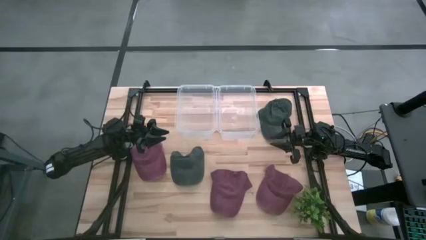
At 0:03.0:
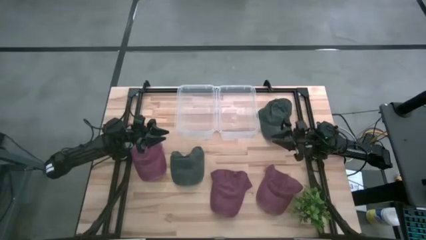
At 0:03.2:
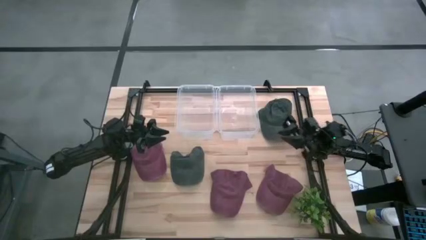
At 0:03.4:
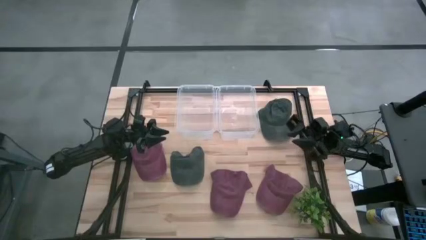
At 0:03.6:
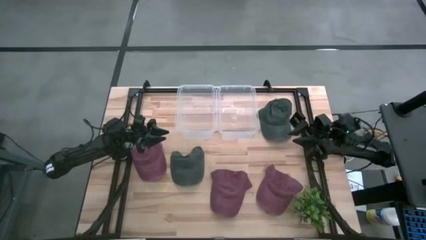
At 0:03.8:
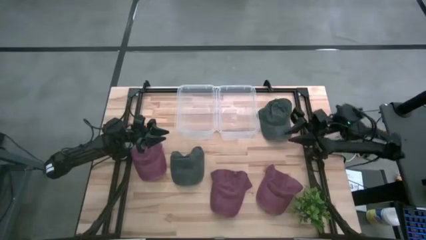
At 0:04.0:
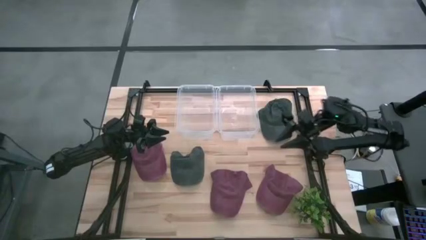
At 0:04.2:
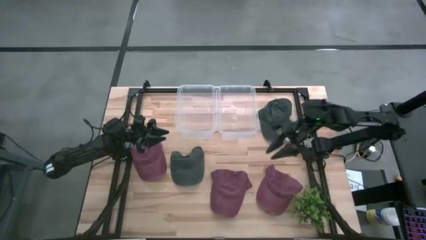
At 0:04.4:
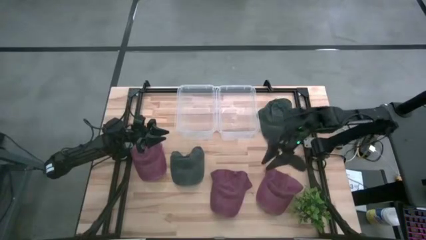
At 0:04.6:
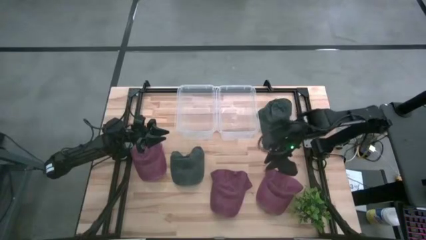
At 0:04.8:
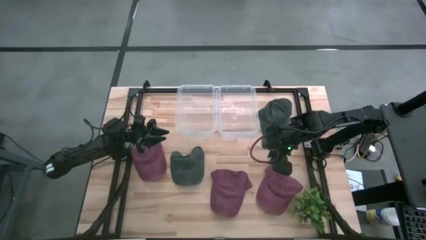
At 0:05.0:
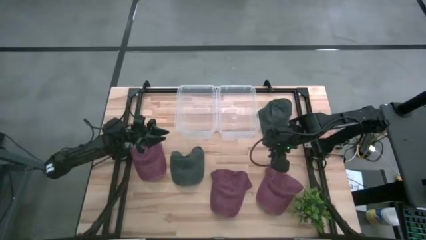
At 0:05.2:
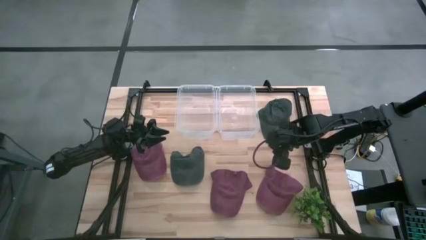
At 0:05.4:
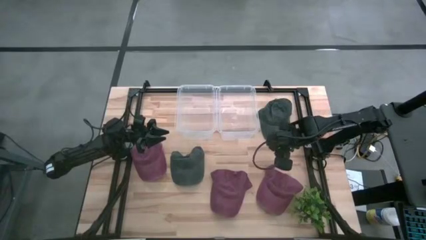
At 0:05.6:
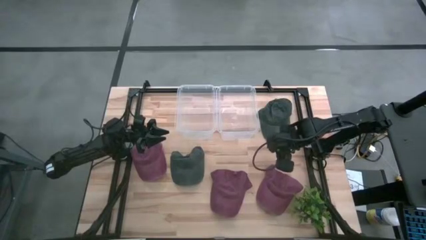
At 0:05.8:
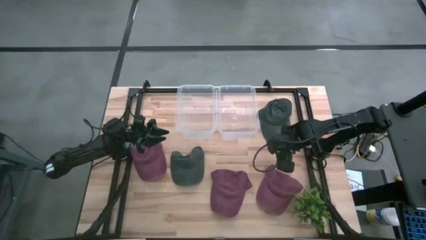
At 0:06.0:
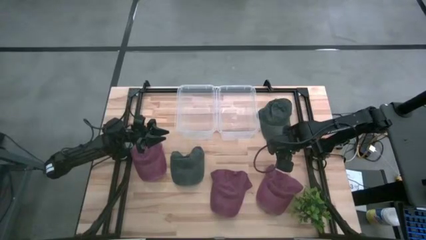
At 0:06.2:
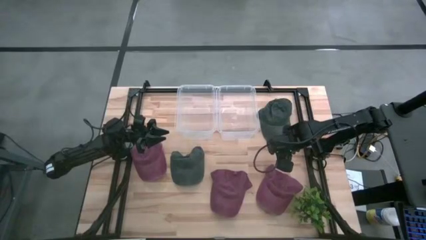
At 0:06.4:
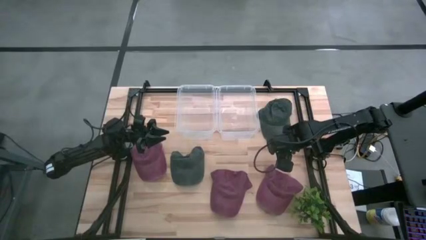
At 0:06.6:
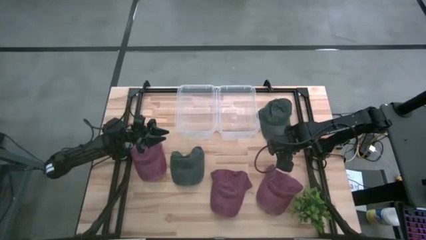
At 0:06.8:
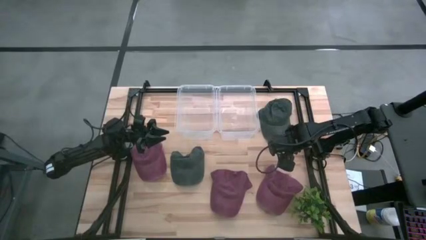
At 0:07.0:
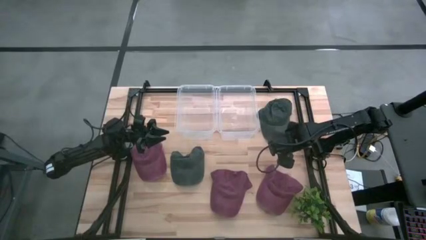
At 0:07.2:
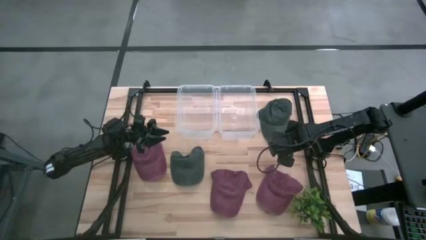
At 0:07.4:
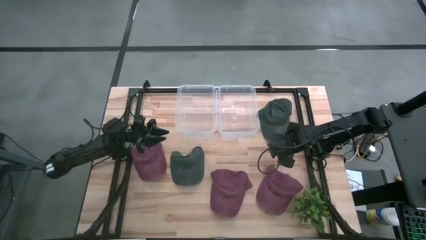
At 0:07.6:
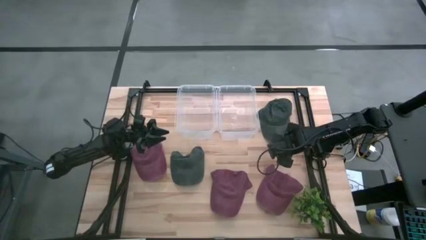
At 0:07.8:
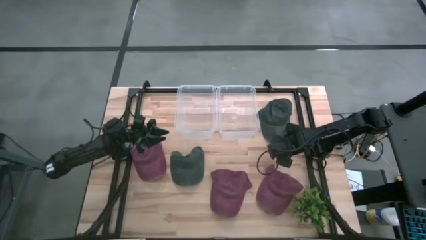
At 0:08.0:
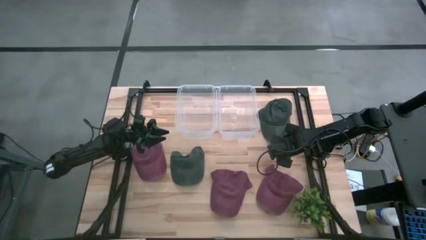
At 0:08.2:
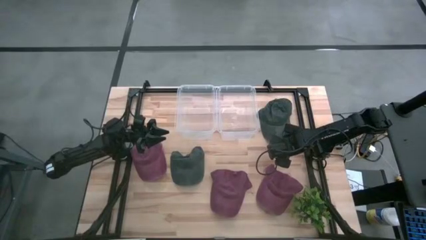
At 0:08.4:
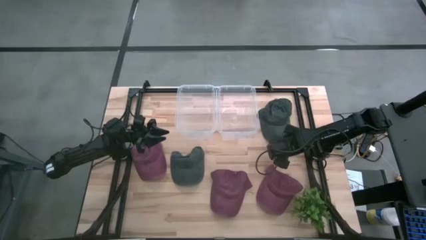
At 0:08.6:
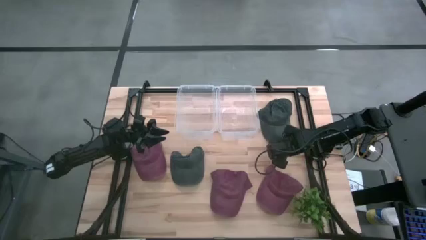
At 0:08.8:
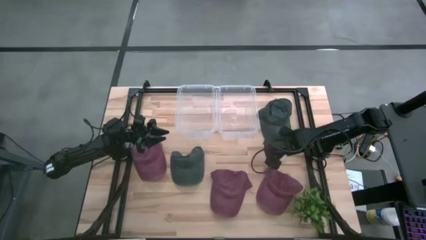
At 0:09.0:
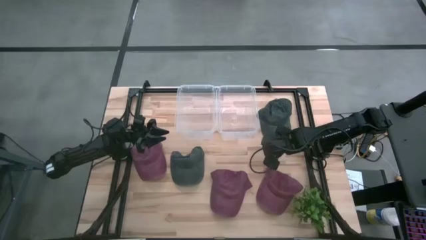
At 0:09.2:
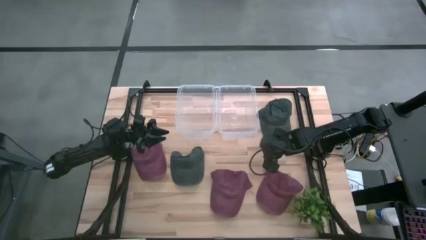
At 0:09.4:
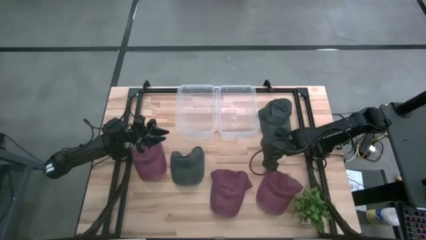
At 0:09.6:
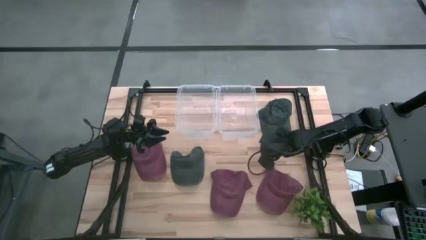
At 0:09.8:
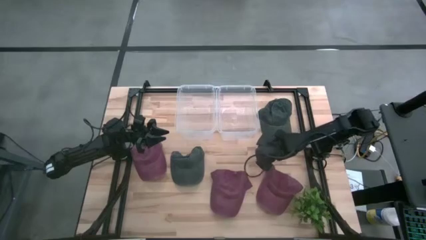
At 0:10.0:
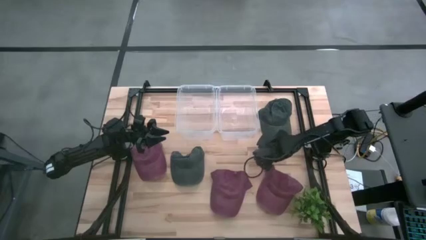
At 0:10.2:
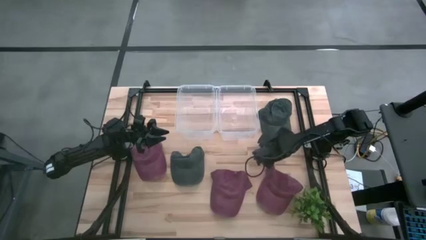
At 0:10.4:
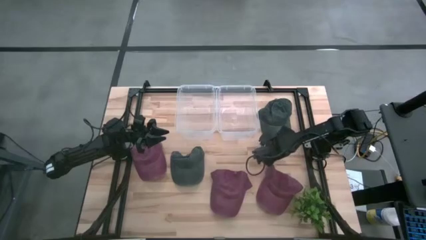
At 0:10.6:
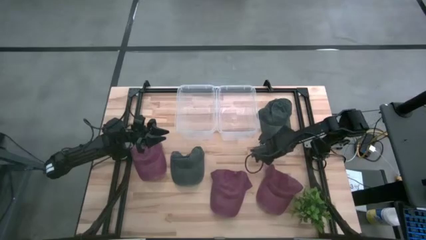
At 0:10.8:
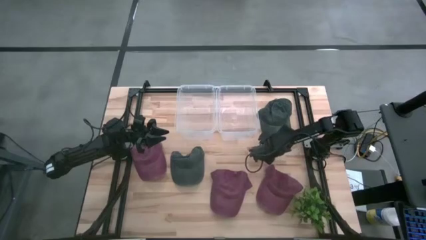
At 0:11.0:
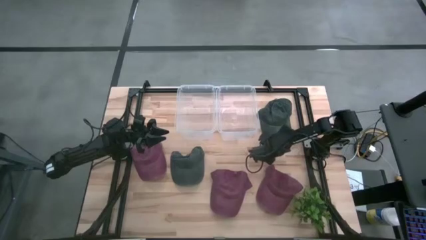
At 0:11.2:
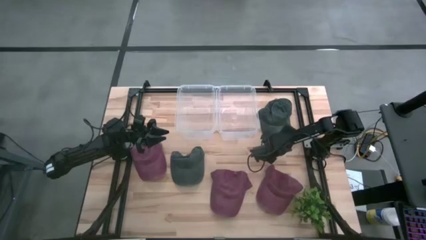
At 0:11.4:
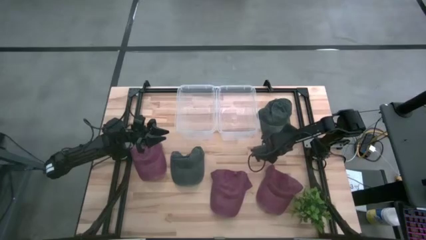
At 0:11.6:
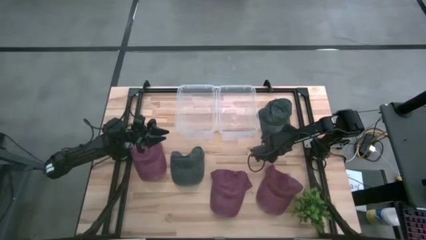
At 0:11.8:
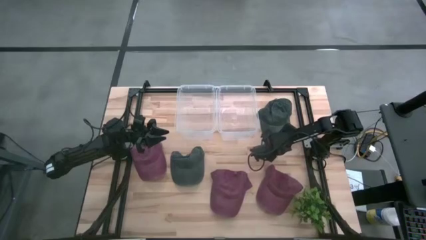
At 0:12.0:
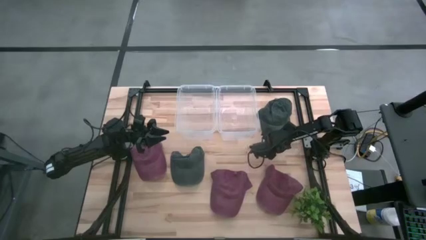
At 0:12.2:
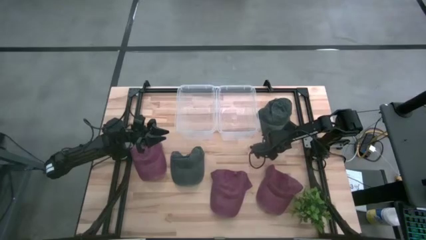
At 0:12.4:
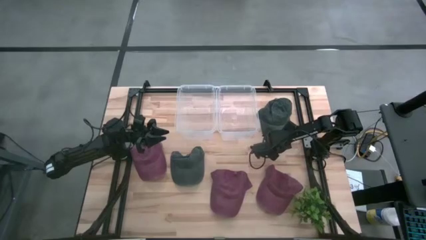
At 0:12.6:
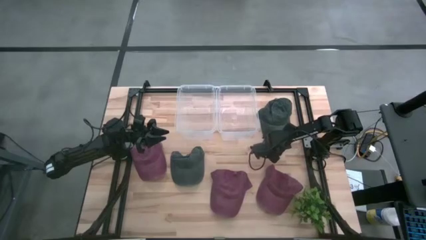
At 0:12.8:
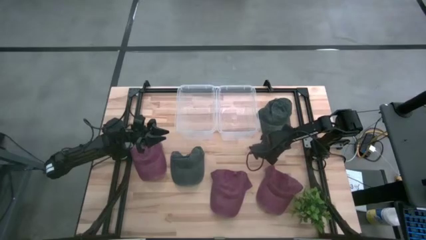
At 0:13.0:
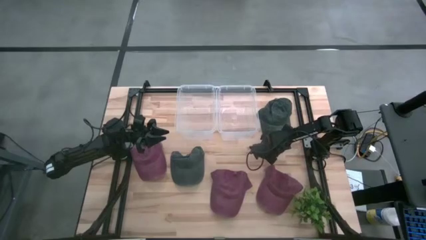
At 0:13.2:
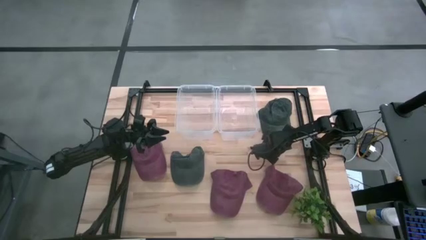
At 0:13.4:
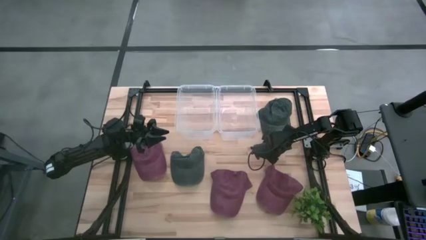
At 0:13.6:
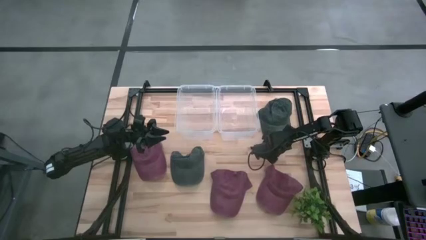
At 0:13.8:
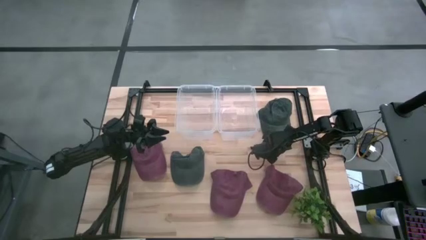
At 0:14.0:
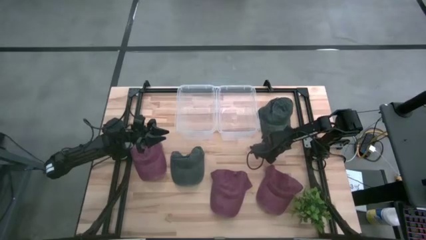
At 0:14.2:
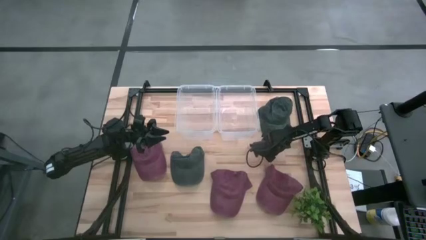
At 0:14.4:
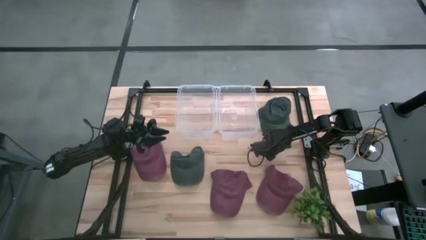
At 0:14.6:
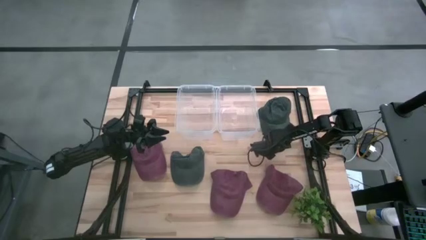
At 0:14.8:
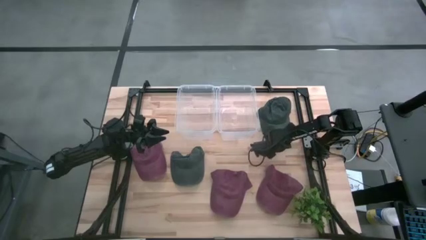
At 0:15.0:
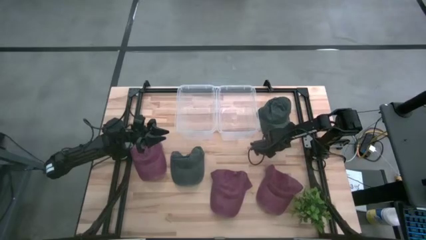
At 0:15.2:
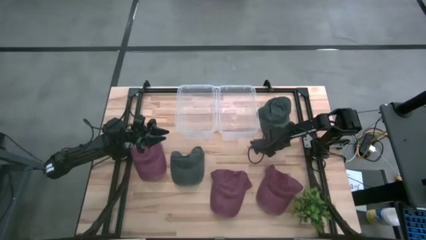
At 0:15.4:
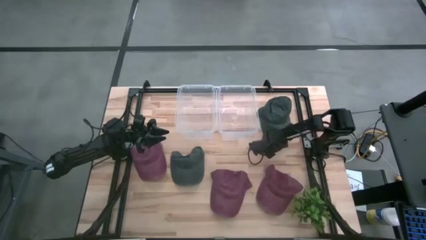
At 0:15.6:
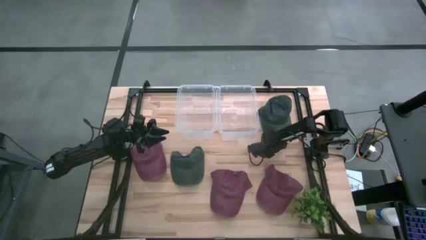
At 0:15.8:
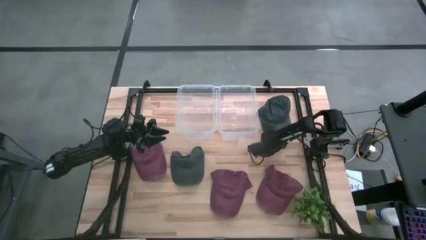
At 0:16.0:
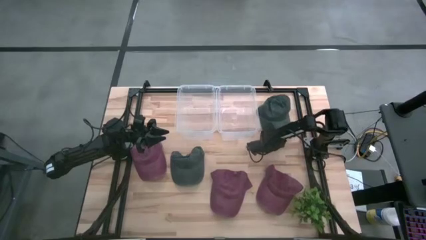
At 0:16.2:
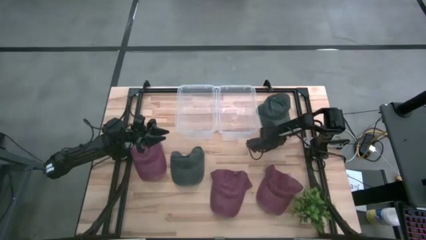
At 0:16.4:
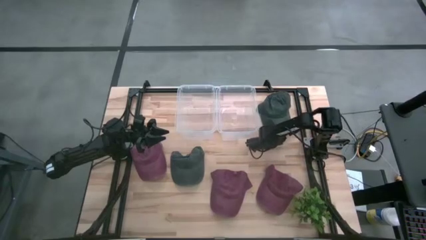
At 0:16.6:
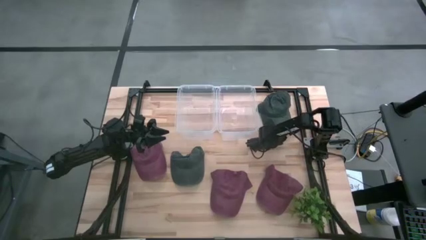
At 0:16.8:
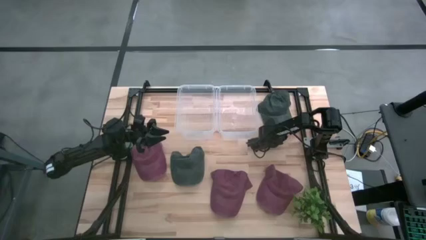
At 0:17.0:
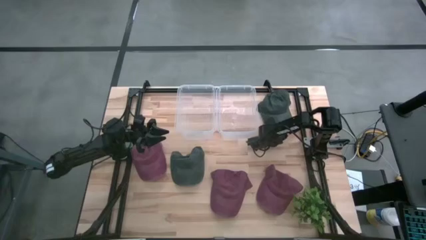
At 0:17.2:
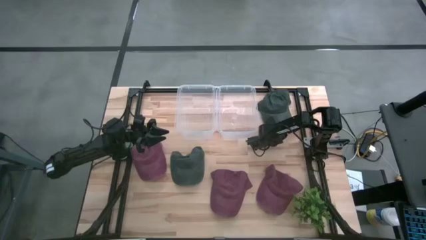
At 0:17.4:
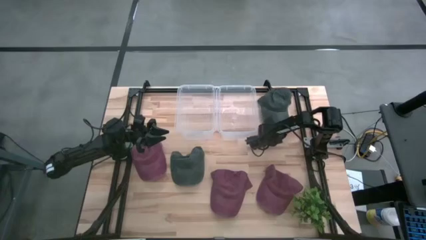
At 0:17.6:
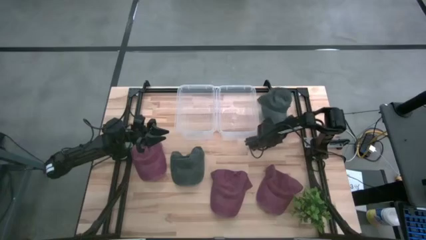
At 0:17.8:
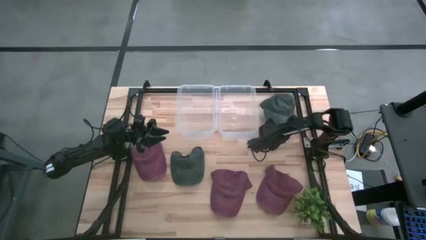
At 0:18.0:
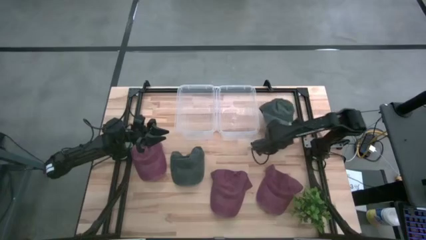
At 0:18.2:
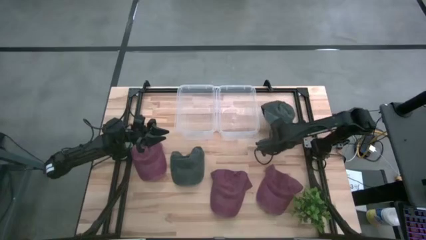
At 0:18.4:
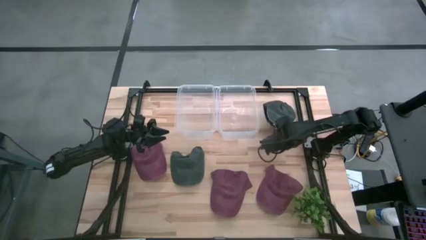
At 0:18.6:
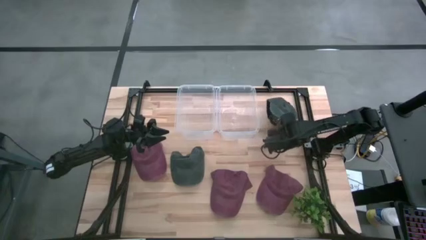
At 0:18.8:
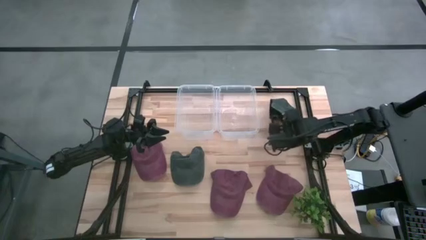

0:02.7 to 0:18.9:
Task: Pick & Place hat
Put the top black cap into the right transparent bin
